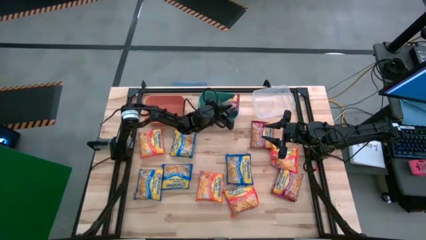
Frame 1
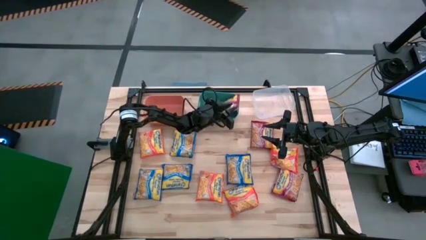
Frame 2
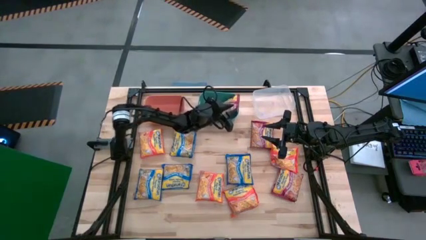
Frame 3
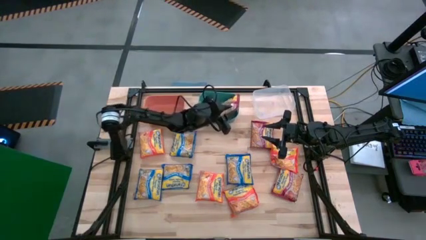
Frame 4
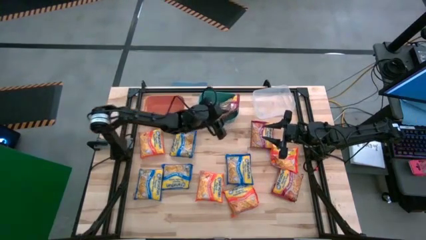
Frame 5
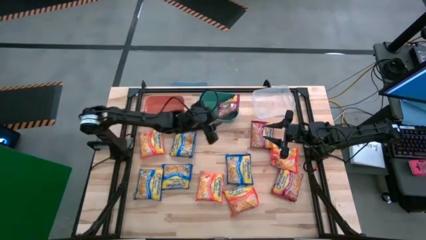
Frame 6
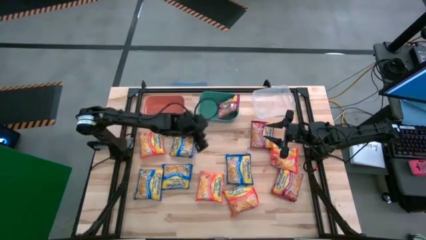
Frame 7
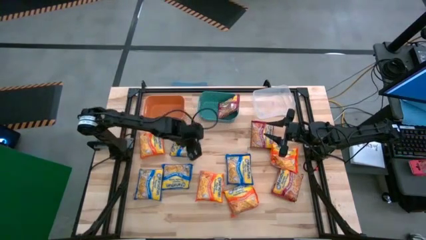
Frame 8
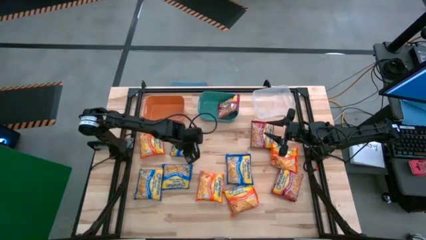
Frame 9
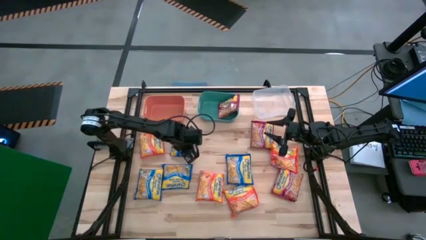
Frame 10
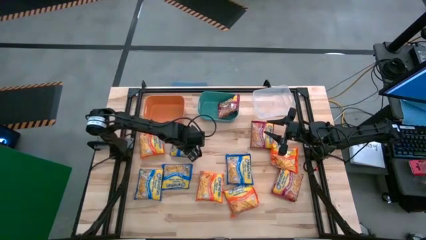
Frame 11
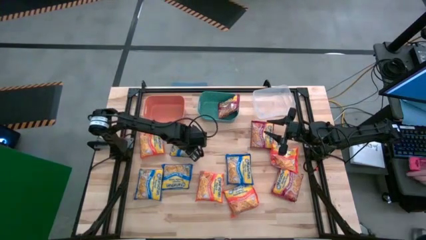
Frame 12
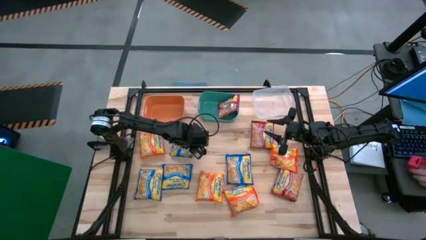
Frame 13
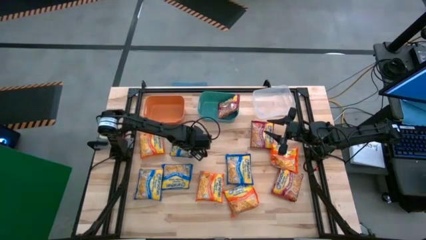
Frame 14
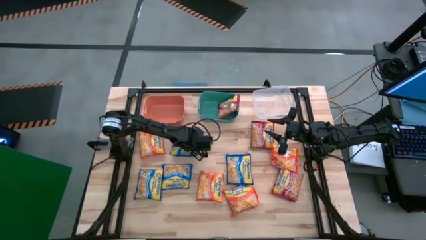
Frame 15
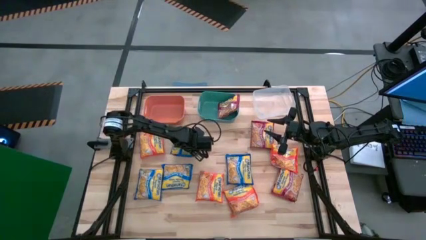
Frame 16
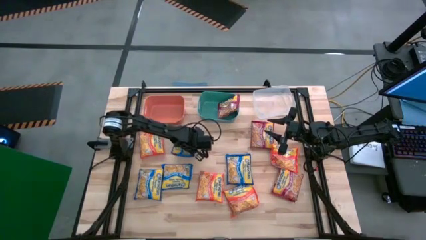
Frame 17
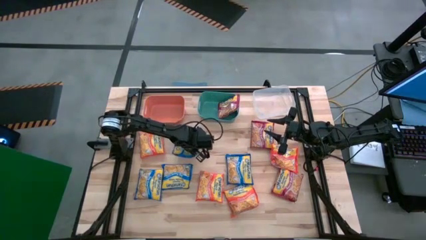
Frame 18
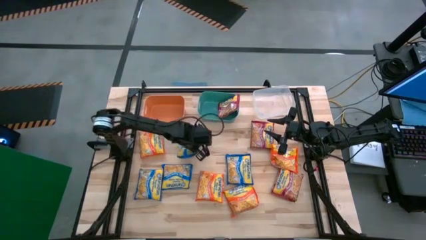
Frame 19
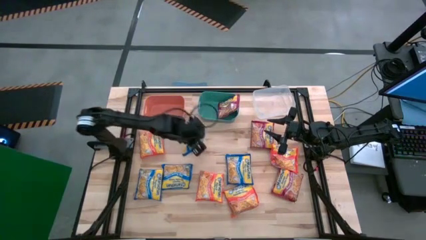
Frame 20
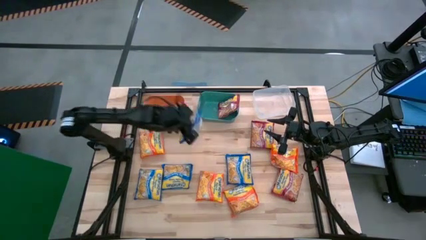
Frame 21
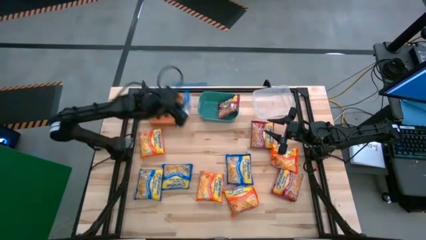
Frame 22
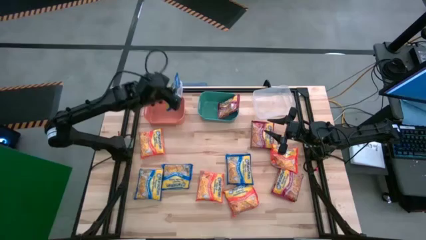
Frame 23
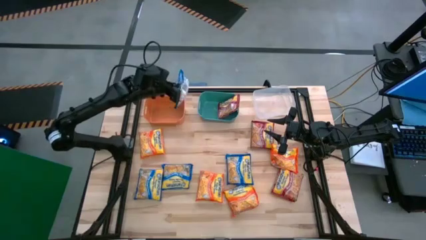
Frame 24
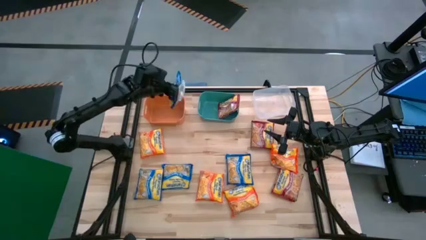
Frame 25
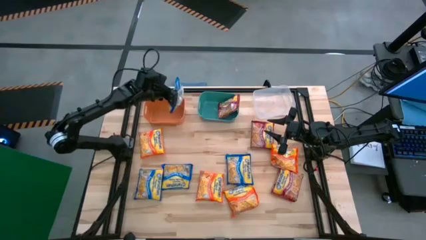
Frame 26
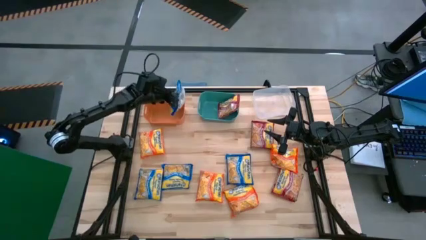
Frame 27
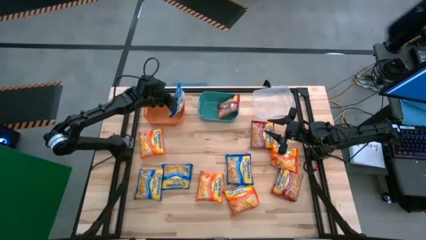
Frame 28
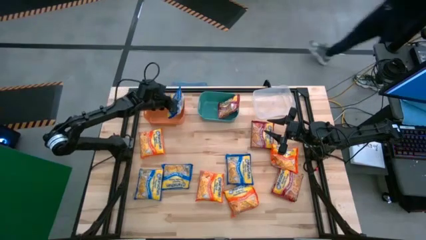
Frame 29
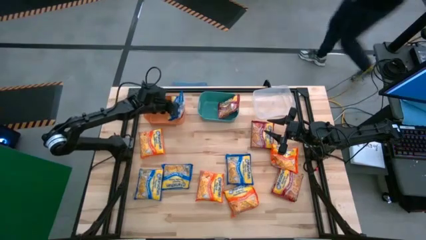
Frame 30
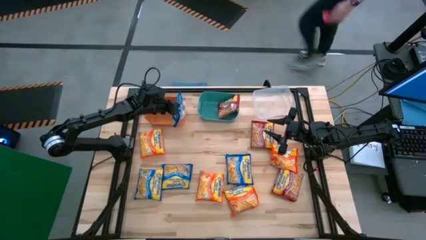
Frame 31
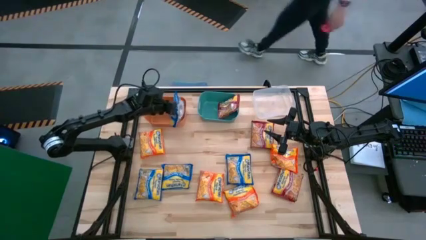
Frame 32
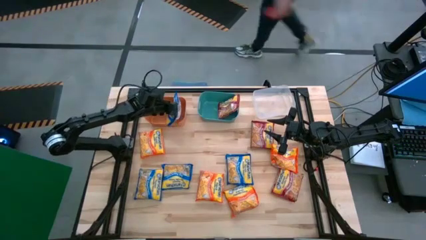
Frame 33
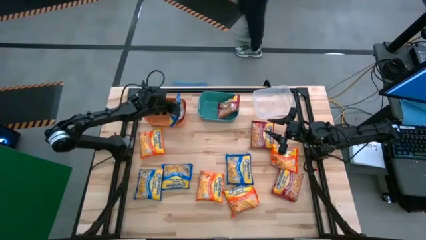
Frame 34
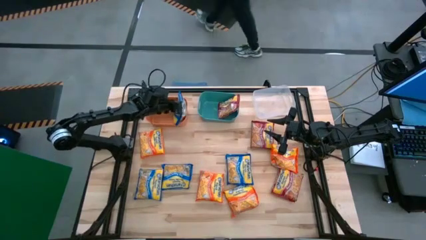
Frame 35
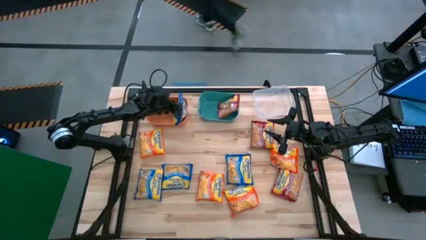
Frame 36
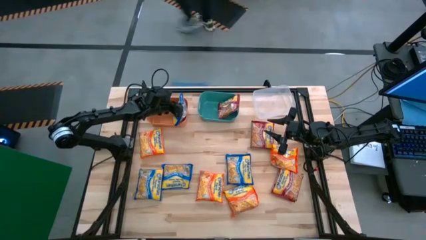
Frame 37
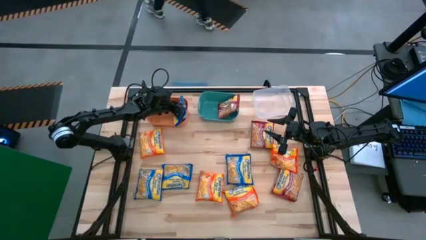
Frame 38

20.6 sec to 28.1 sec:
Task: Sort Maruchan noodles
Put the blue noodle pack into the orange bin

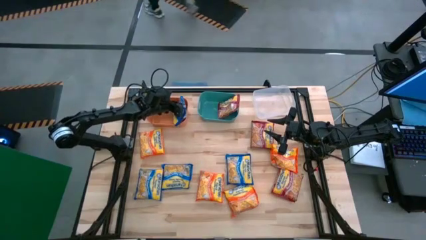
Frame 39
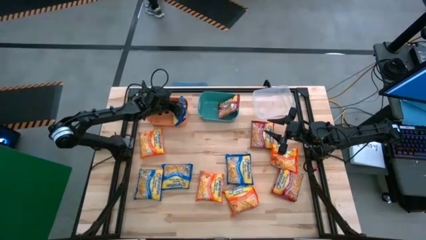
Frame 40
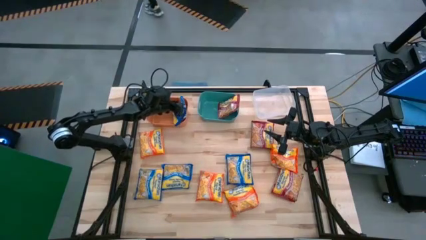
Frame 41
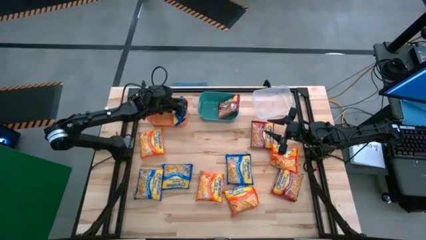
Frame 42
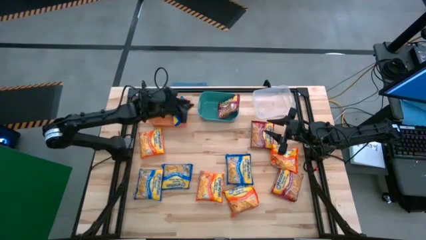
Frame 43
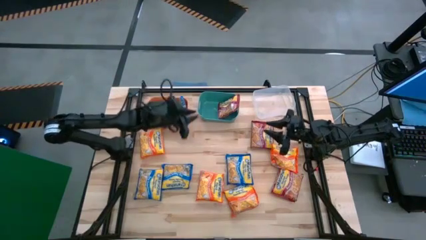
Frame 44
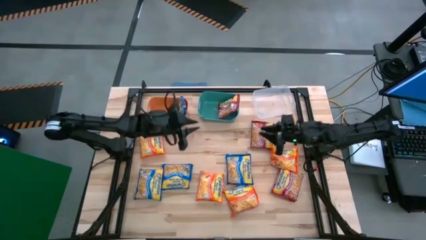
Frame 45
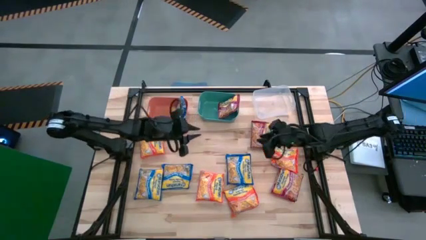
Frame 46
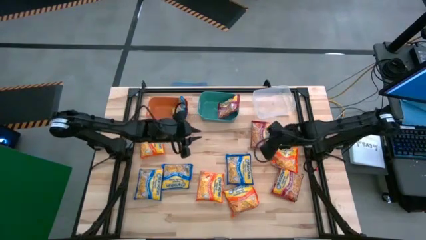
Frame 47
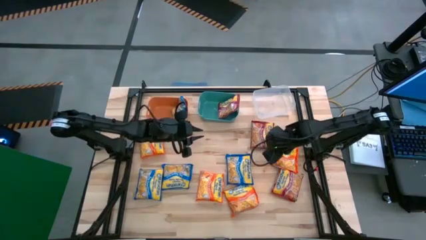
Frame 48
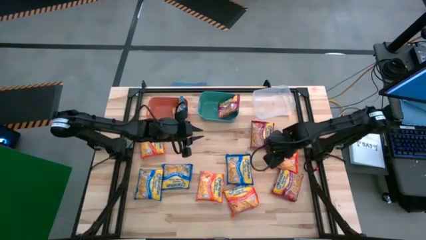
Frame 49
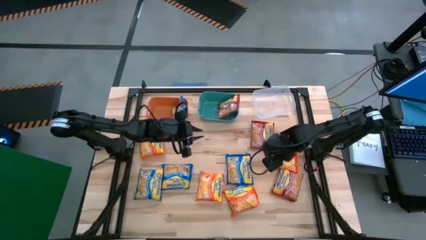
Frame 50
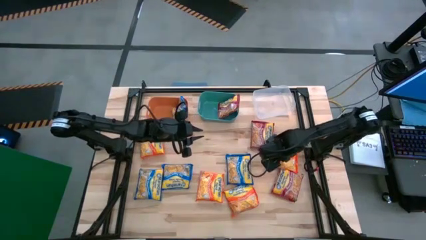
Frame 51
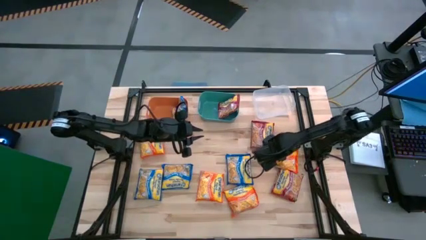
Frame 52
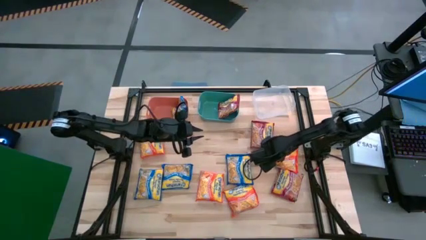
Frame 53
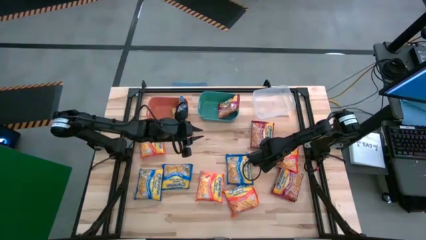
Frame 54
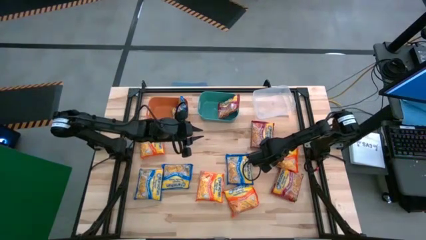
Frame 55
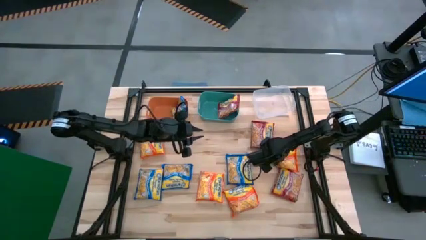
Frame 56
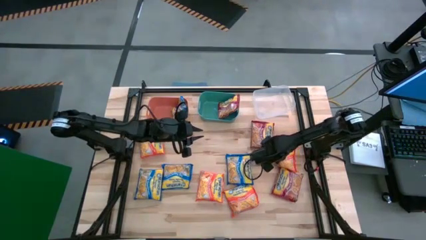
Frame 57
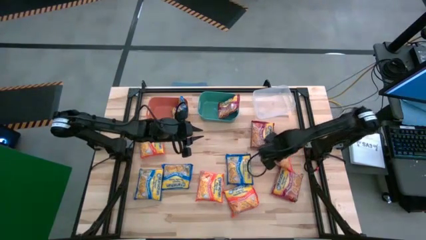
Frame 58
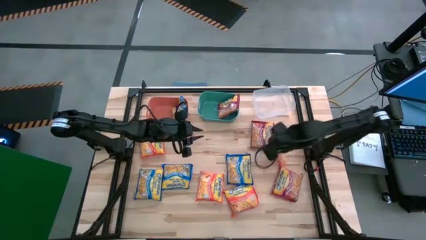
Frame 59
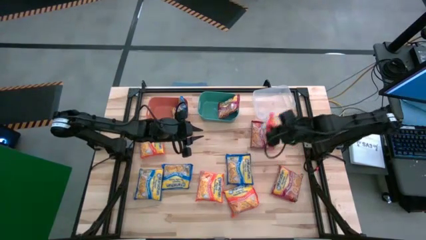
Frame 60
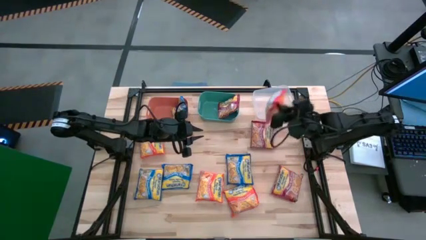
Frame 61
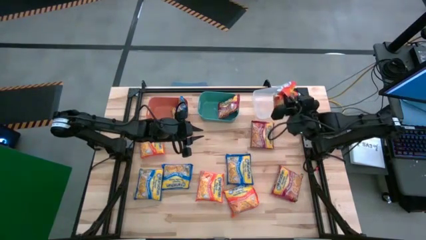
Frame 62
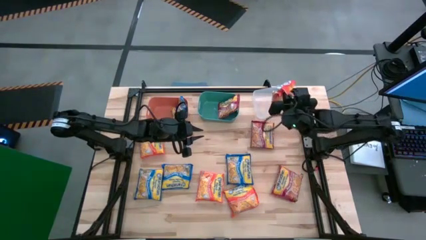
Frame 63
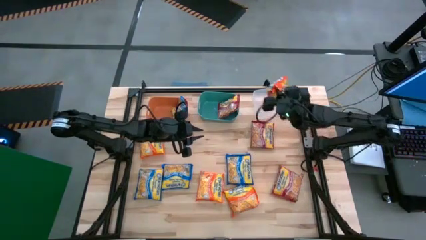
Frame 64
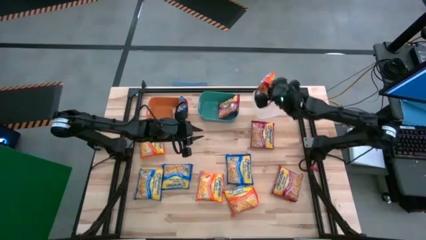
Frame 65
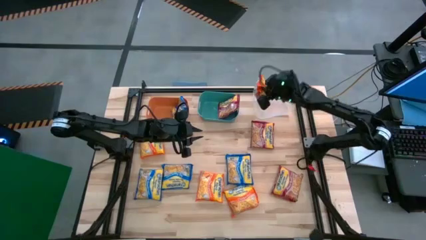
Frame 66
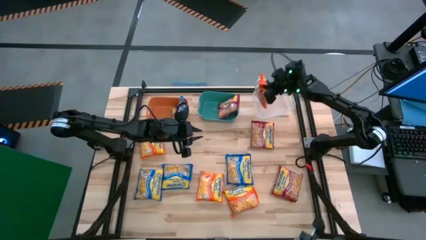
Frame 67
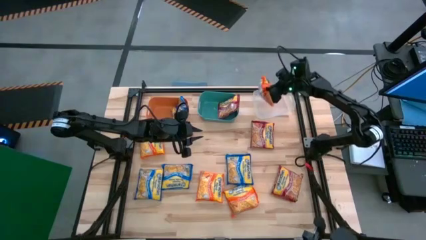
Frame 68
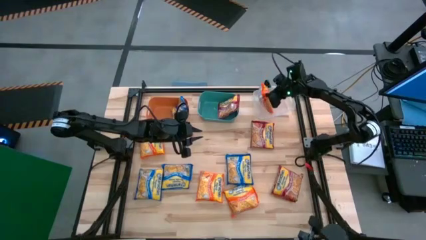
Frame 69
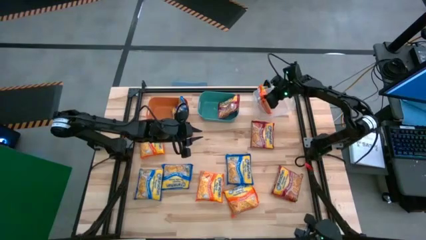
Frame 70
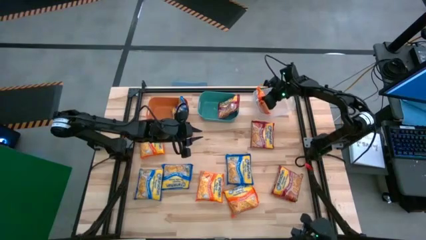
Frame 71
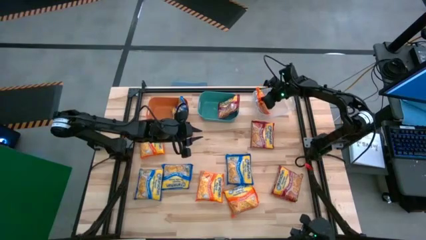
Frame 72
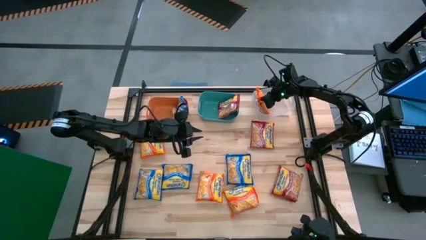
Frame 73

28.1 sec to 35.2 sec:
Put the orange noodle pack into the transparent bin

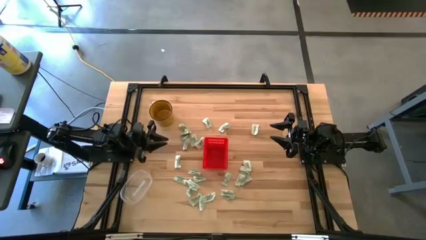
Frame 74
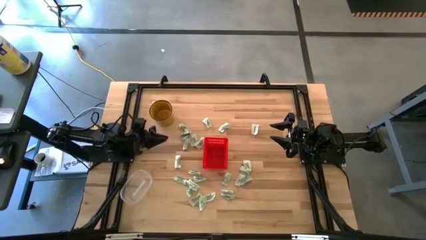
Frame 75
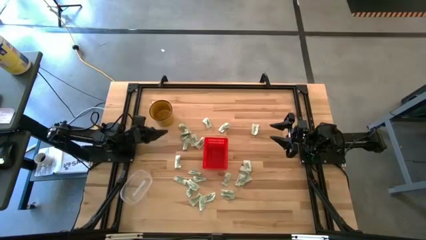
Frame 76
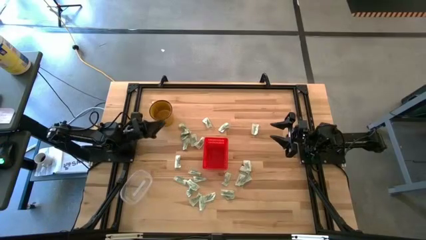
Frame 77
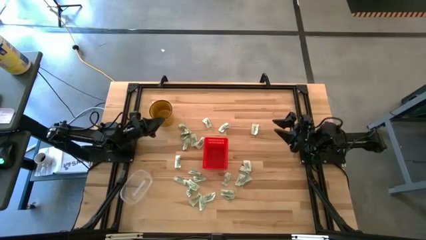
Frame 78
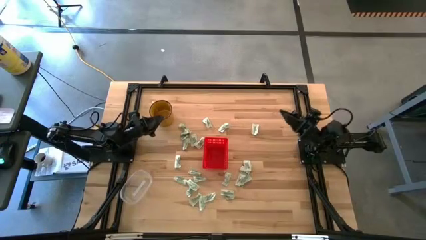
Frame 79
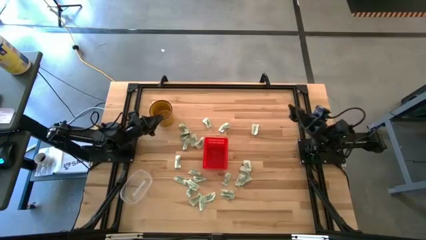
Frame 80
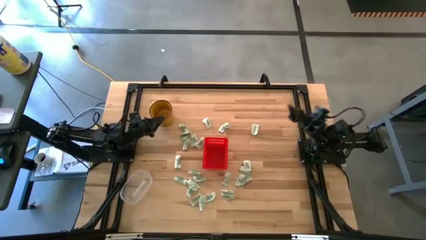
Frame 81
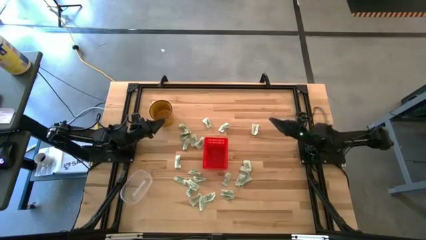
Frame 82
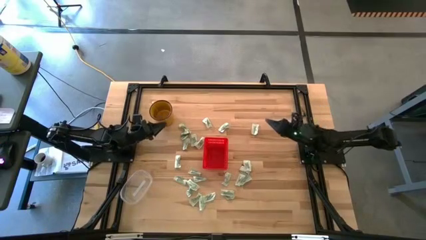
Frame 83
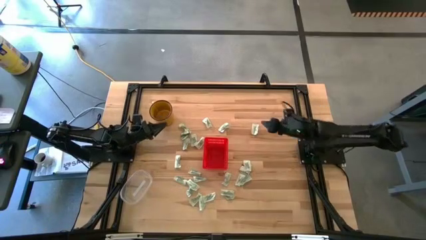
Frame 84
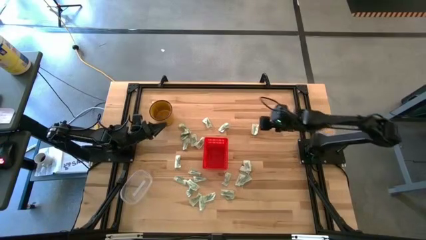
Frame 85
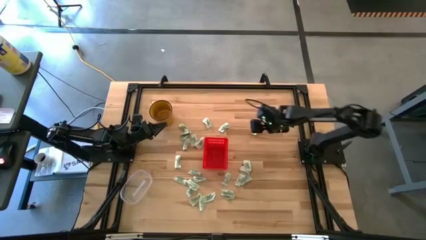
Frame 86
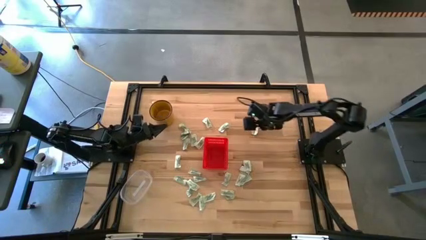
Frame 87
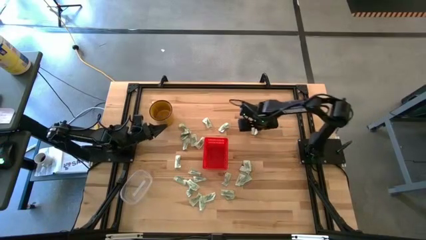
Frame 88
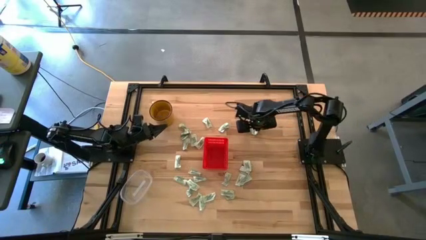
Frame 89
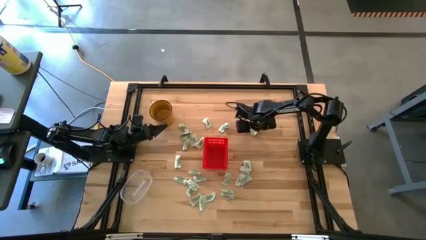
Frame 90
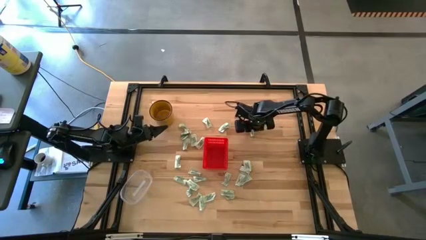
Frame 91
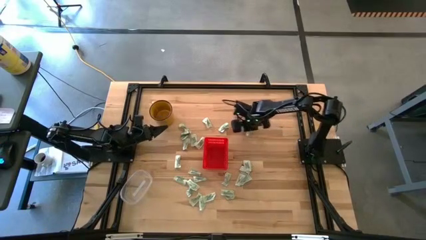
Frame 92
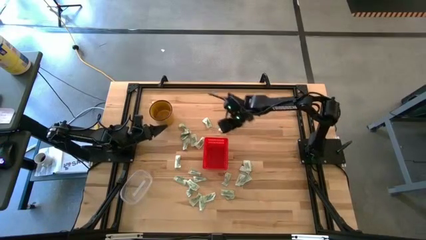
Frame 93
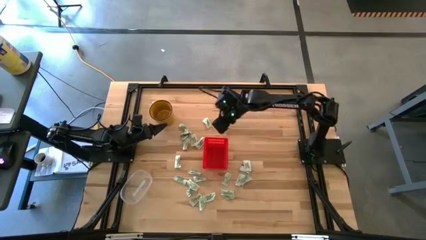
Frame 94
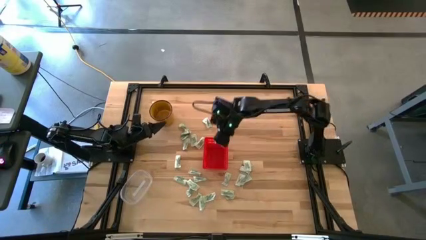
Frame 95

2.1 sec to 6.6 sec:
Task: Pick and place Stevia / Truvia into bins
Put the white stevia packet into the red basket
